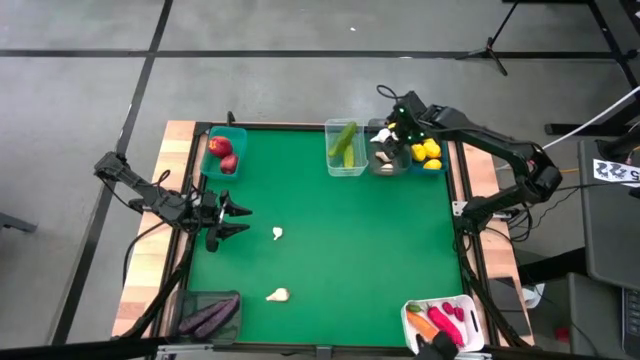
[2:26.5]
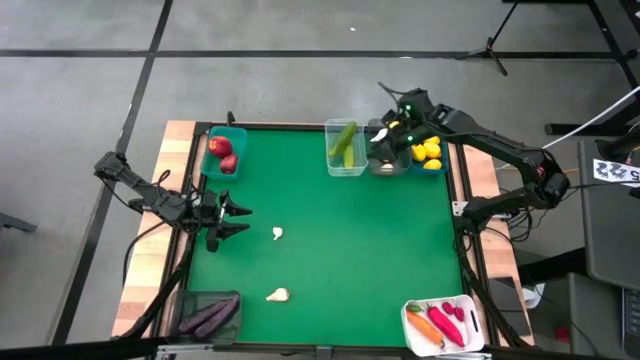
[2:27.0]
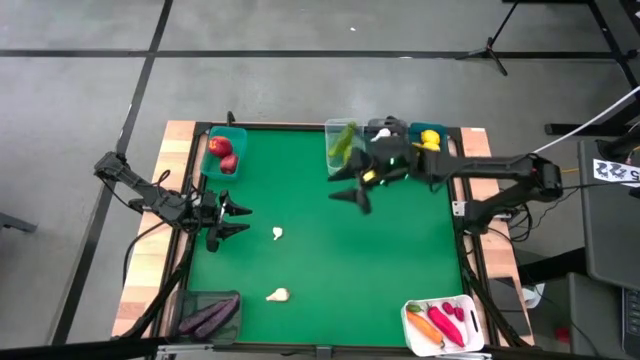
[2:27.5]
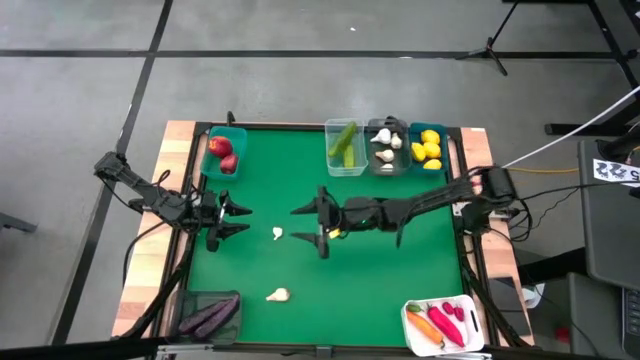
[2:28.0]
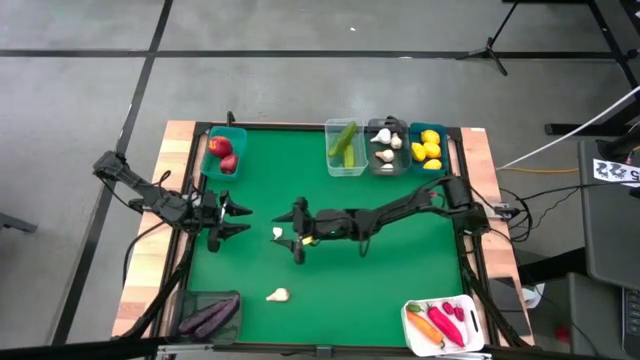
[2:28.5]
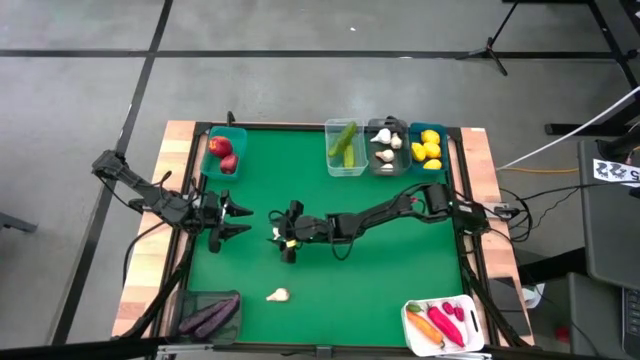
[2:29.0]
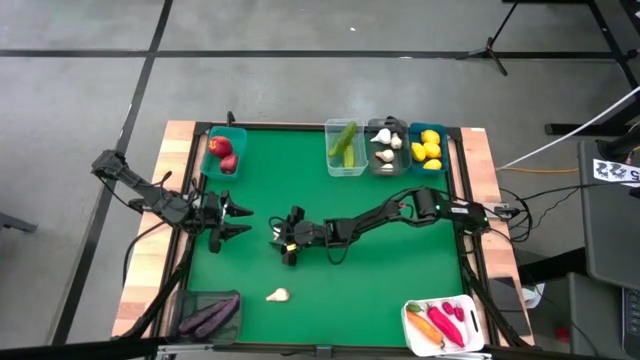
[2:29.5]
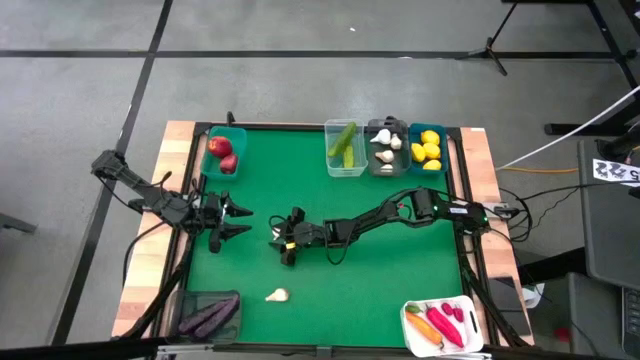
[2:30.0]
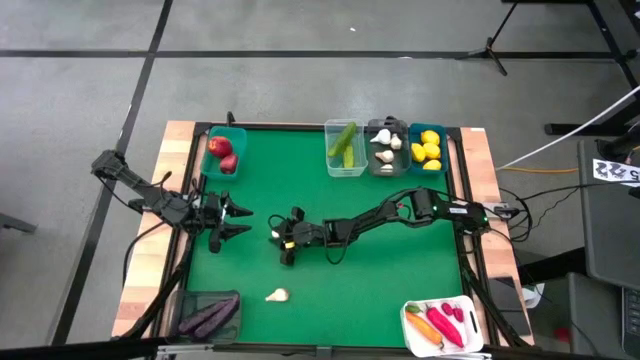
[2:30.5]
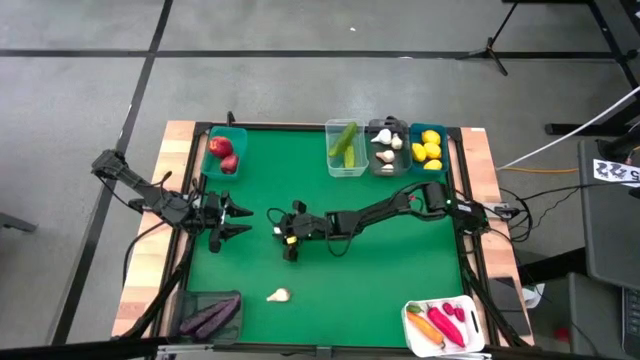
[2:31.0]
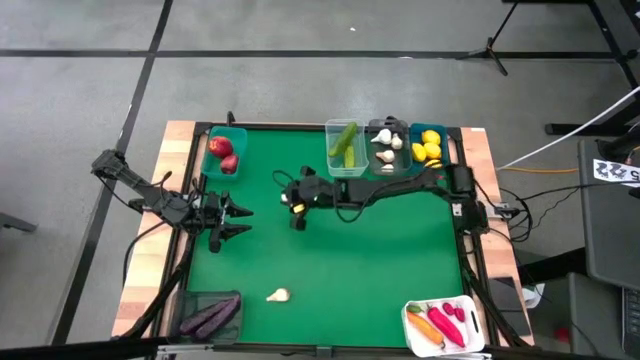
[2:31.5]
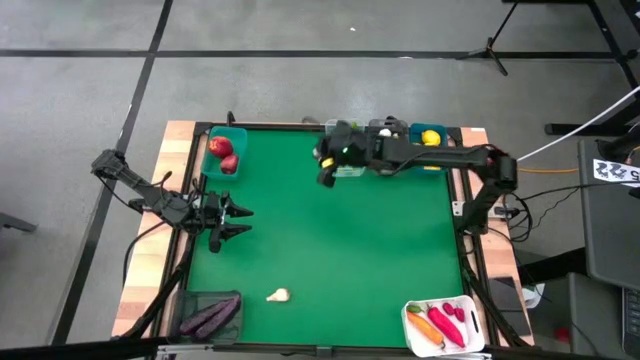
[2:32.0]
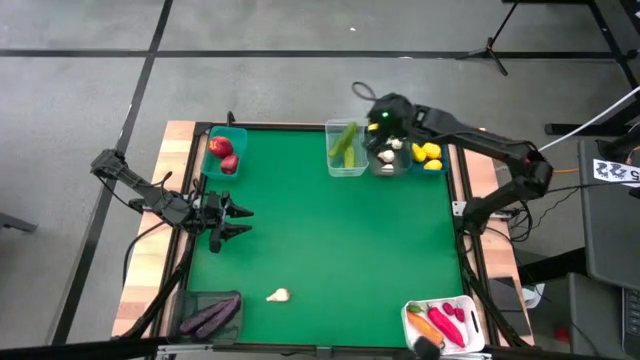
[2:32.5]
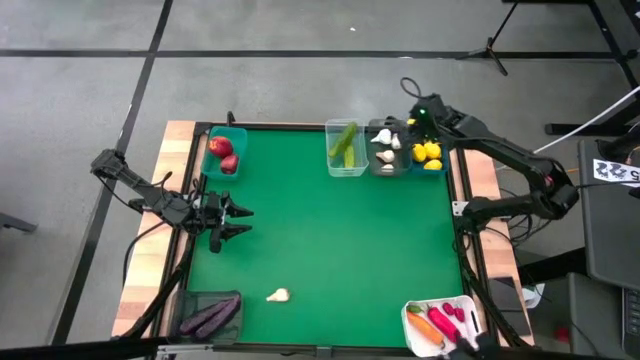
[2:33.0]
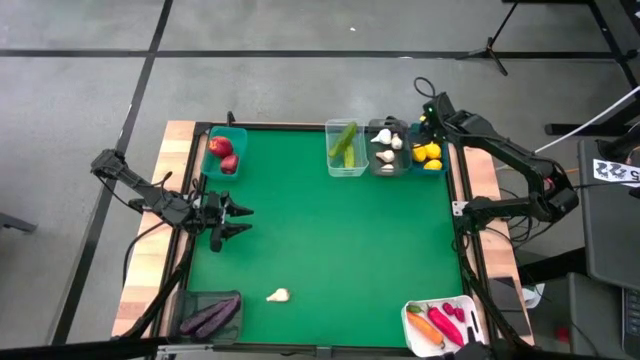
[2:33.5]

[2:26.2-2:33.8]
Task: Sort produce into baskets
Put the white garlic into the top black transparent bin

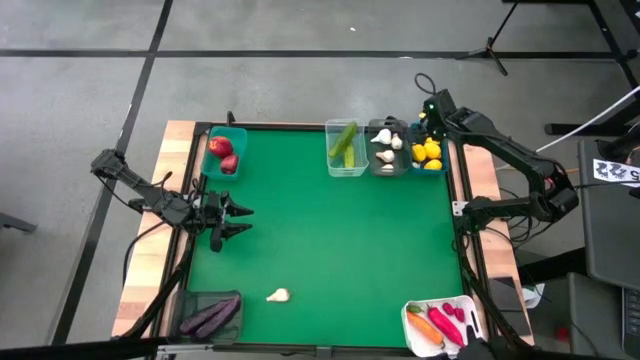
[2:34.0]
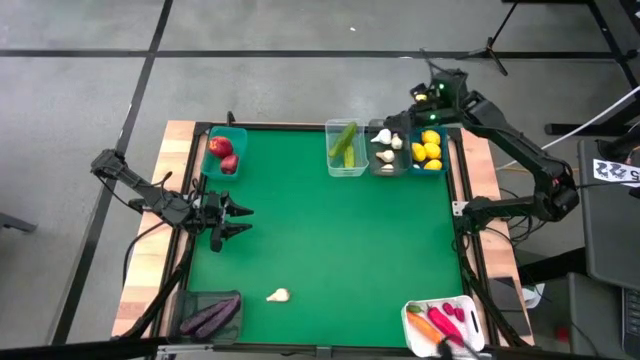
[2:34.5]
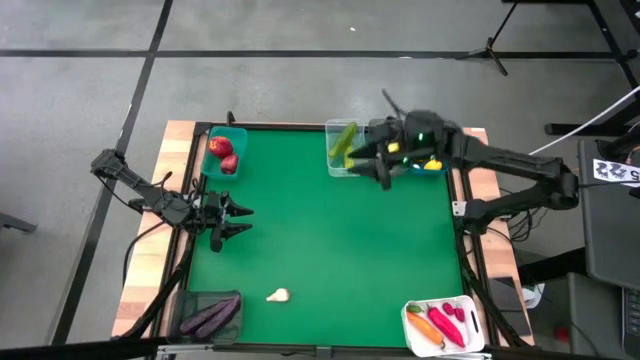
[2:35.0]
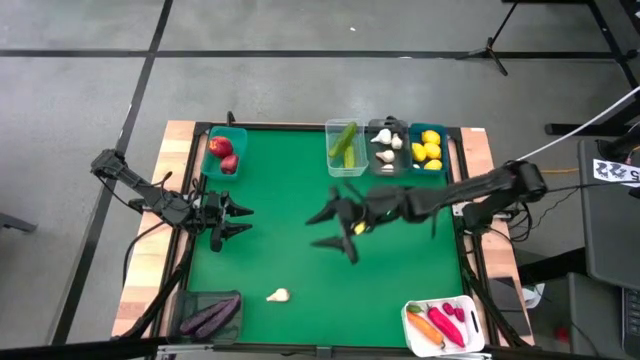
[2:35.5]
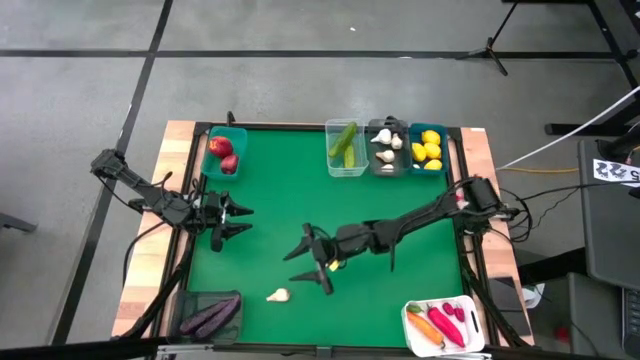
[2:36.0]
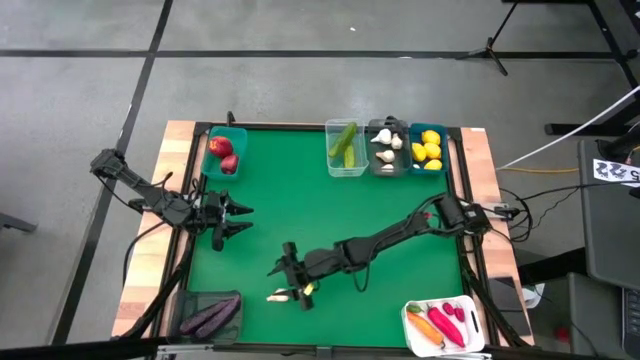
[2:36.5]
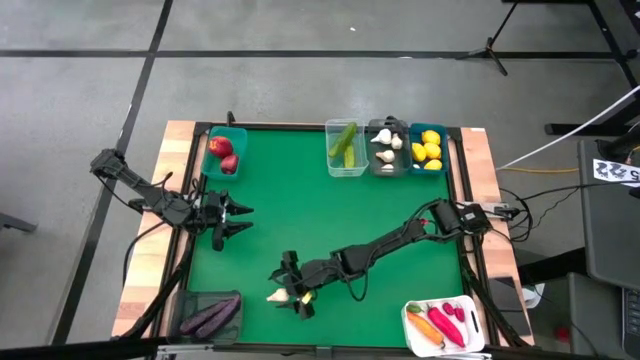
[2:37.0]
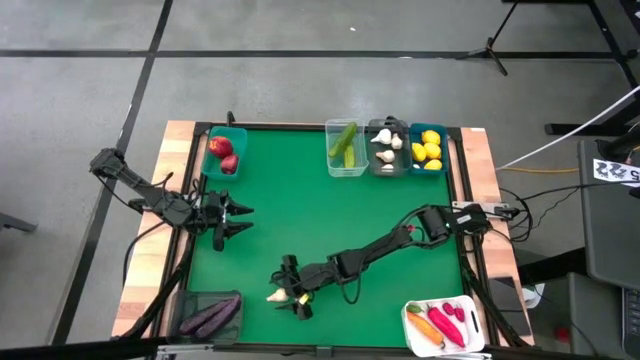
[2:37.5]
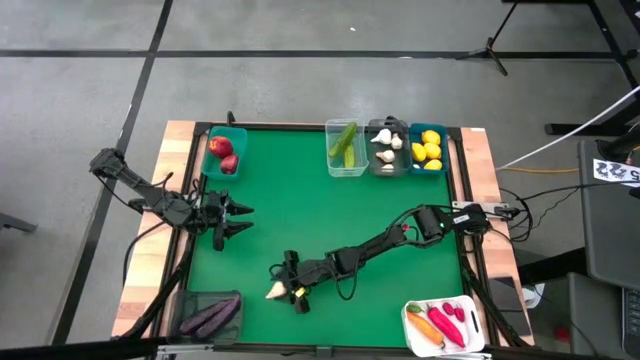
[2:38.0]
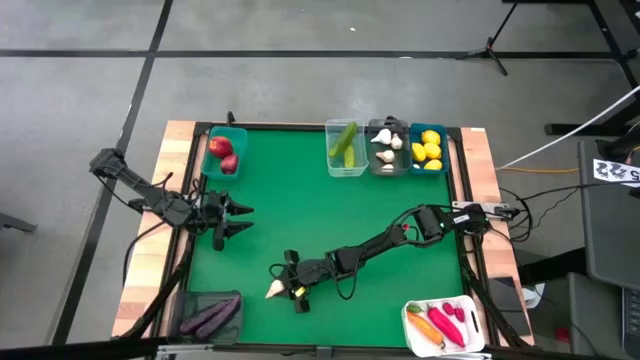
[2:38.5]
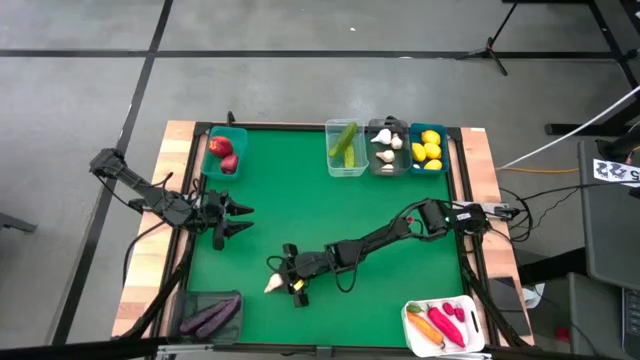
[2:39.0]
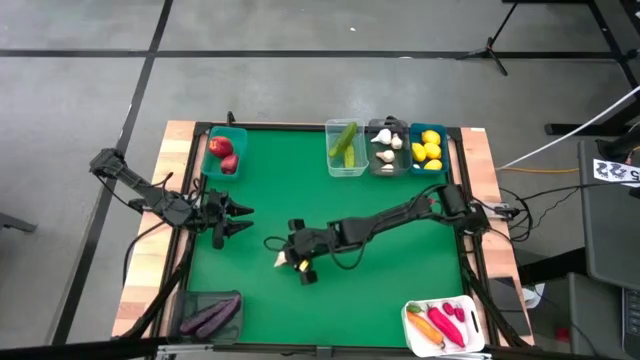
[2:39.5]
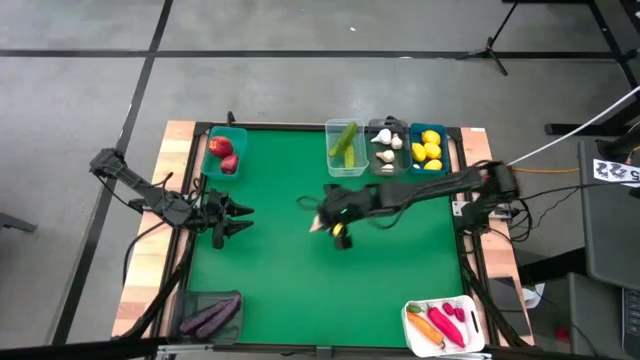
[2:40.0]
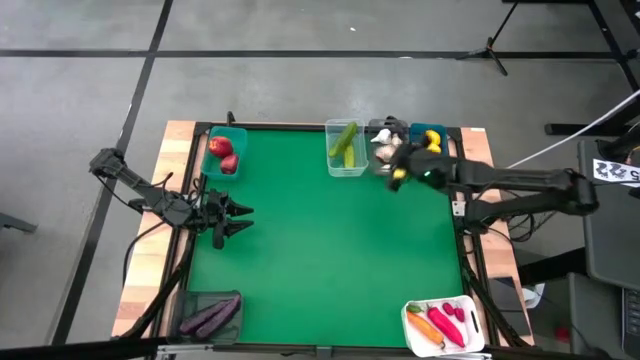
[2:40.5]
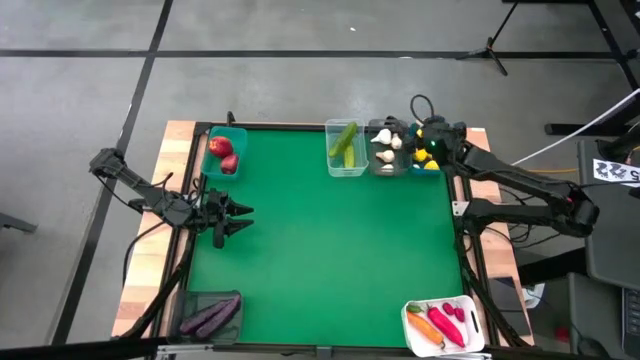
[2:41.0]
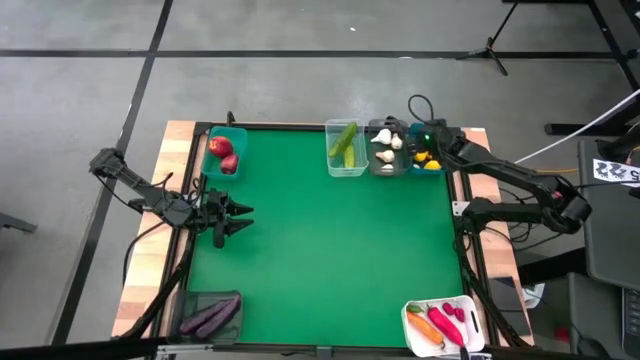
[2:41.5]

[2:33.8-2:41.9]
Put the white garlic into the top black transparent bin

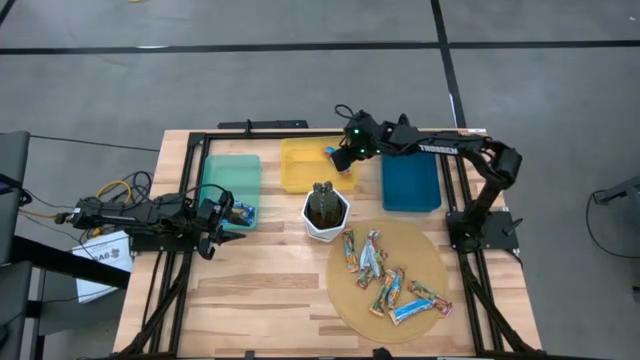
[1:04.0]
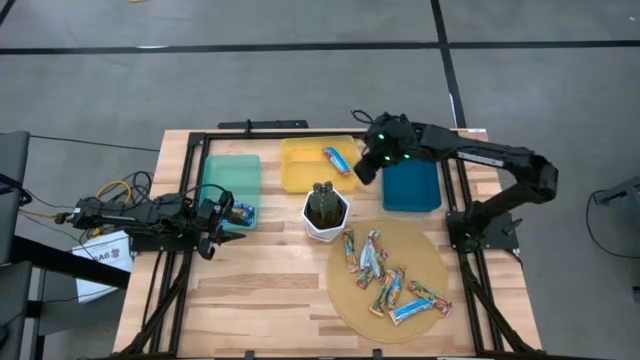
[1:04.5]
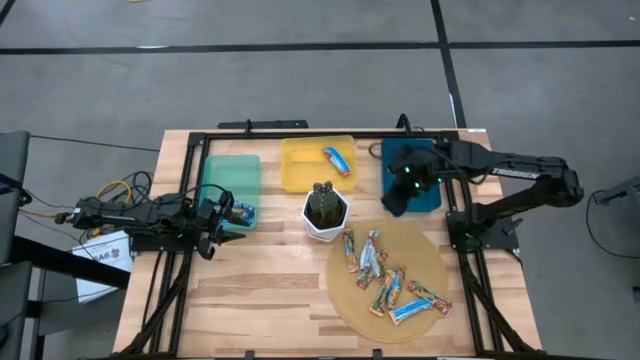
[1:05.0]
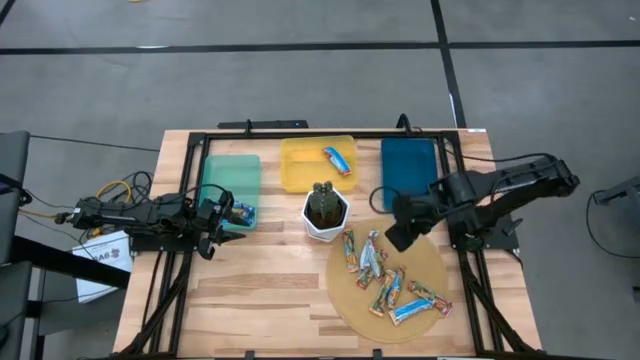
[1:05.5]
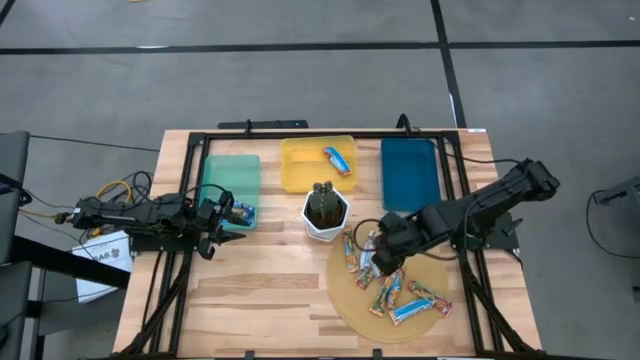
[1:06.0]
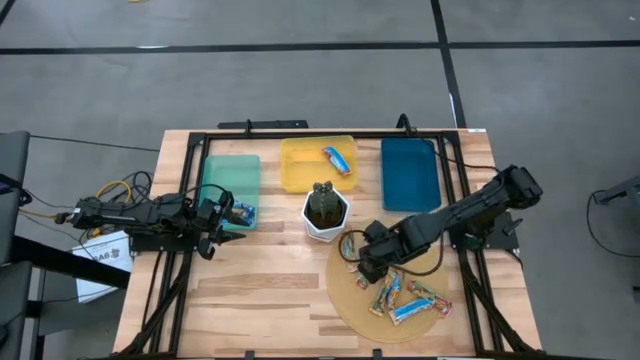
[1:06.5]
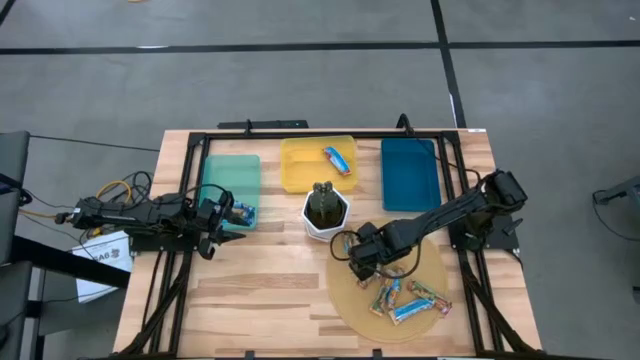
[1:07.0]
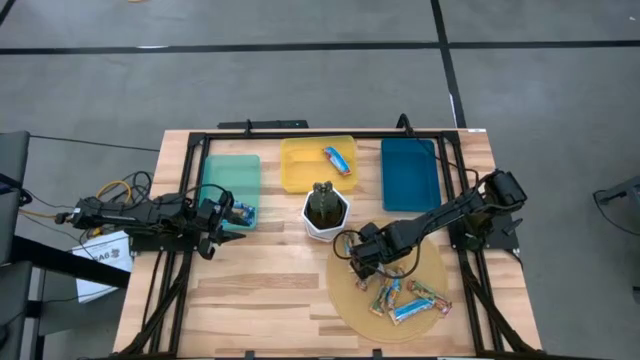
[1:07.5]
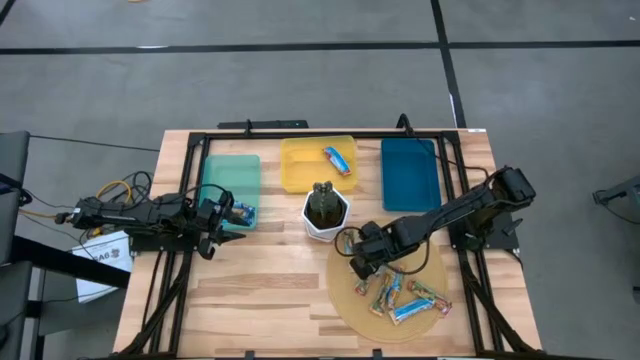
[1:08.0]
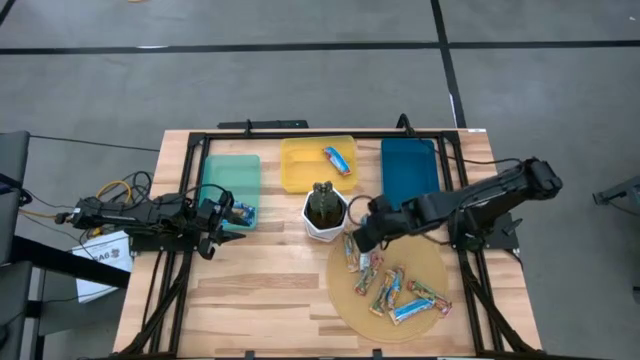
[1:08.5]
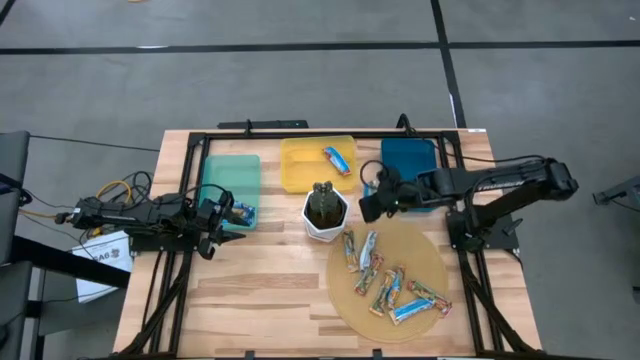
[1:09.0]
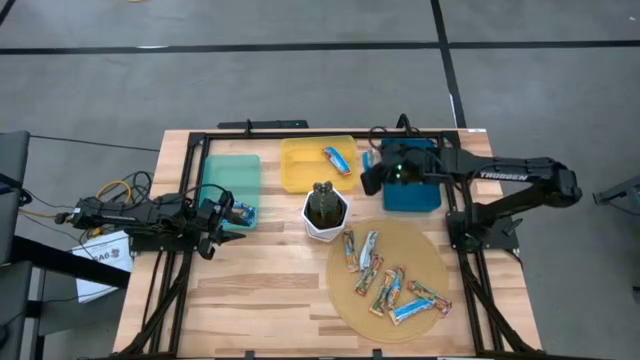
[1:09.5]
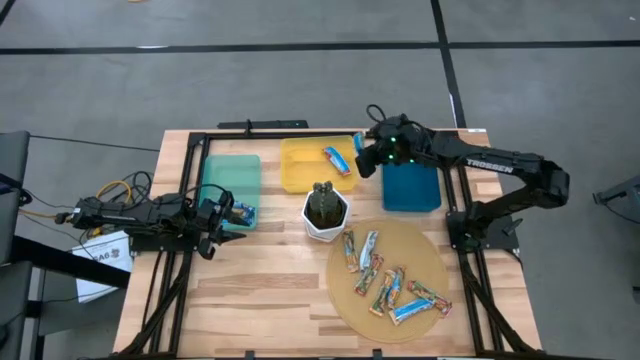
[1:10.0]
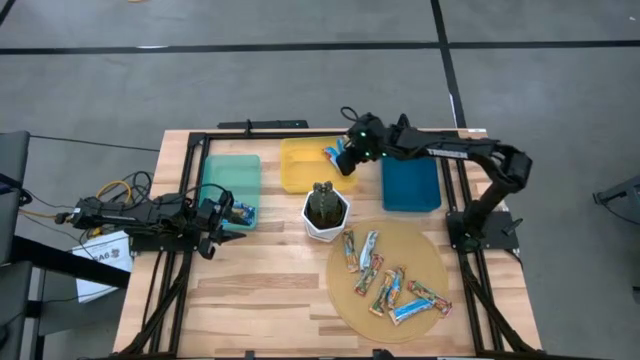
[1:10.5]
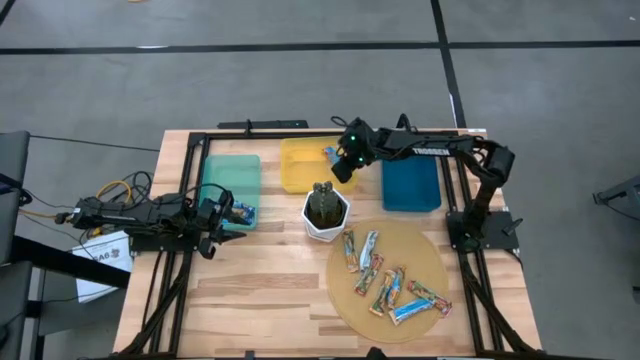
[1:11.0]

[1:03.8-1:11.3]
Task: Pick and place Granola Bars by type
Put the red granola bar into the yellow bin
